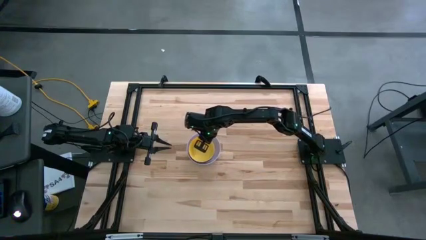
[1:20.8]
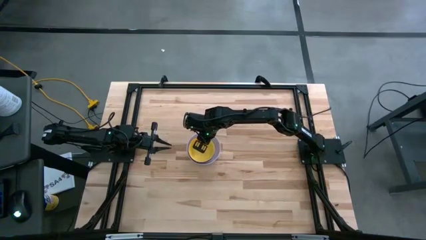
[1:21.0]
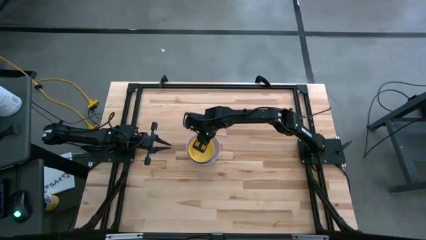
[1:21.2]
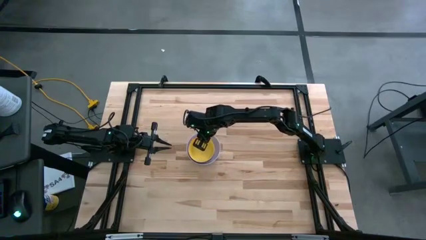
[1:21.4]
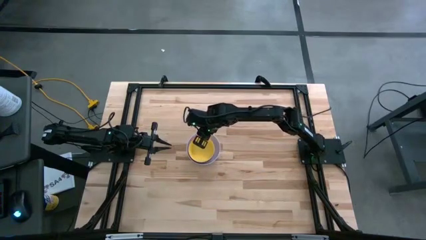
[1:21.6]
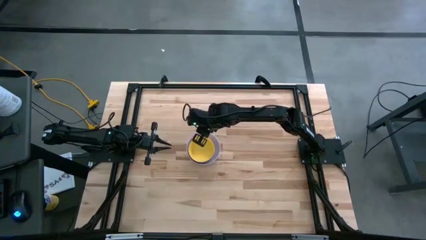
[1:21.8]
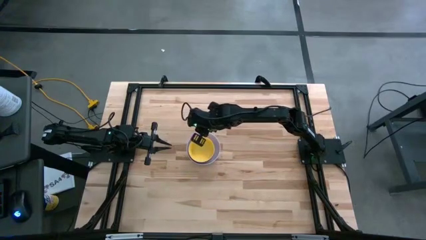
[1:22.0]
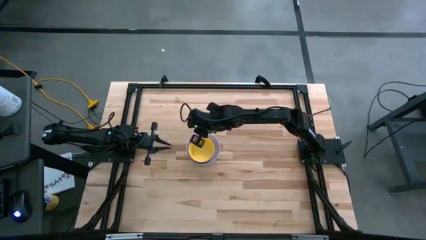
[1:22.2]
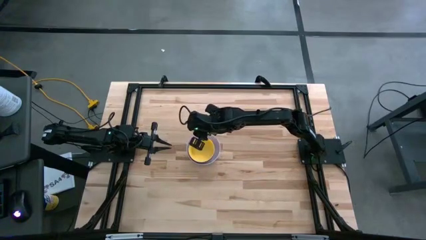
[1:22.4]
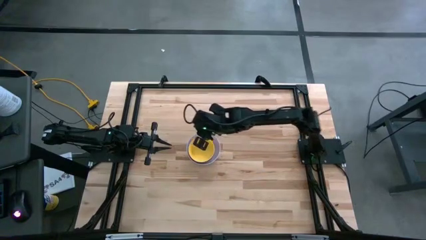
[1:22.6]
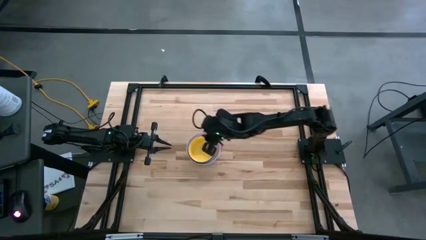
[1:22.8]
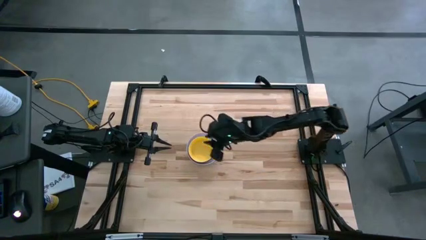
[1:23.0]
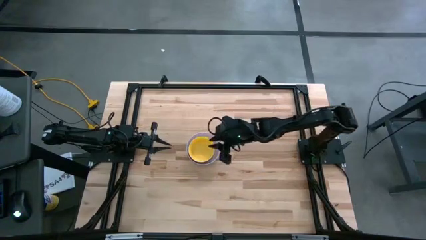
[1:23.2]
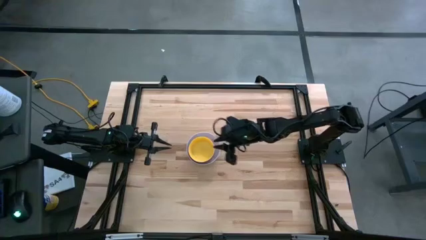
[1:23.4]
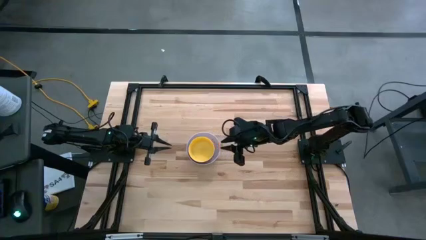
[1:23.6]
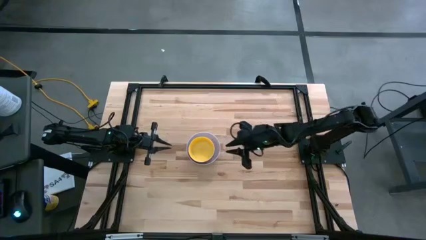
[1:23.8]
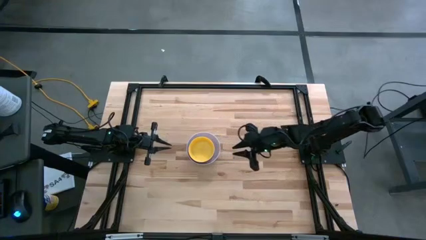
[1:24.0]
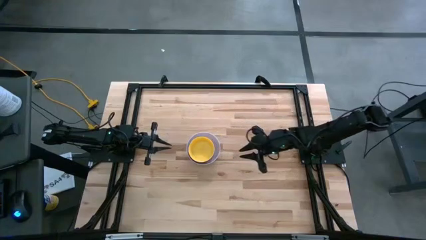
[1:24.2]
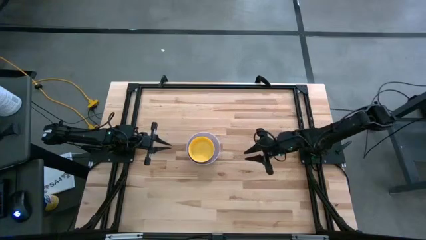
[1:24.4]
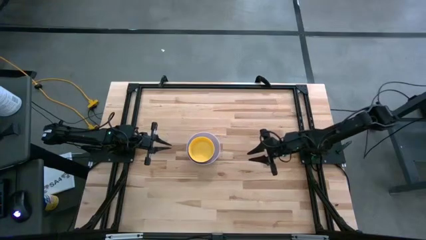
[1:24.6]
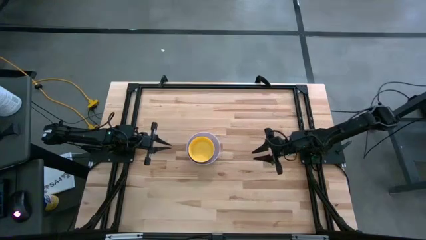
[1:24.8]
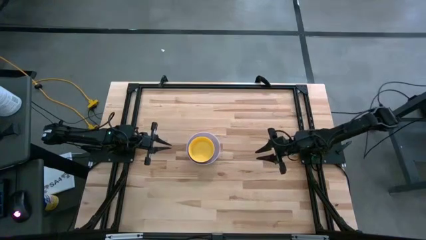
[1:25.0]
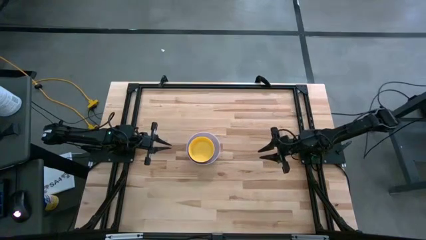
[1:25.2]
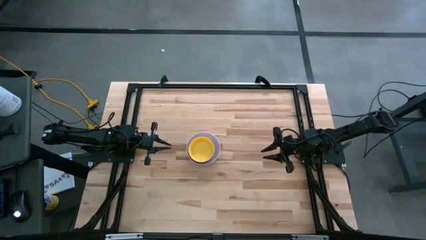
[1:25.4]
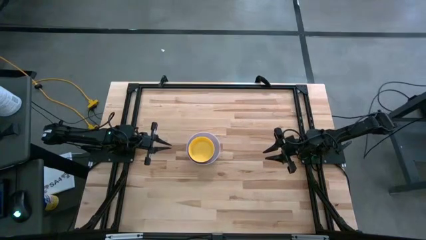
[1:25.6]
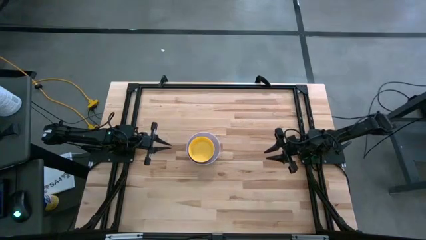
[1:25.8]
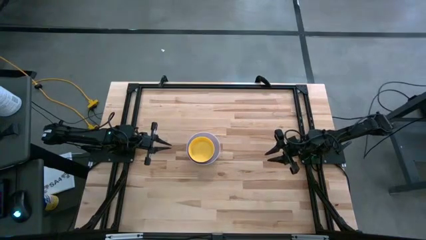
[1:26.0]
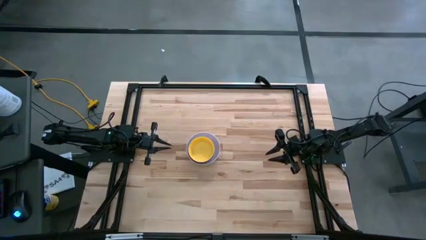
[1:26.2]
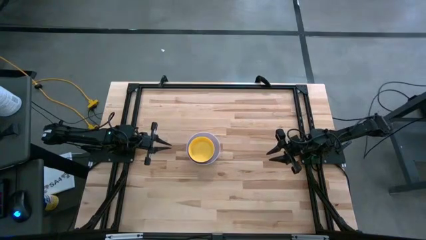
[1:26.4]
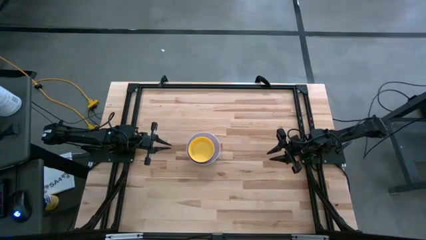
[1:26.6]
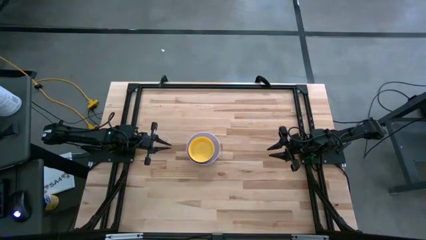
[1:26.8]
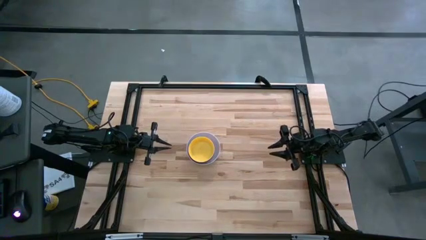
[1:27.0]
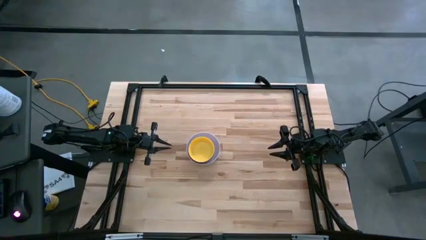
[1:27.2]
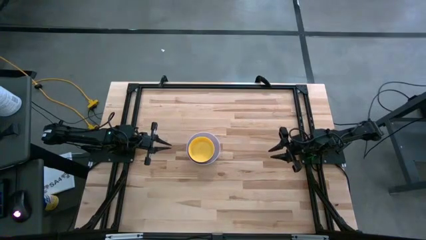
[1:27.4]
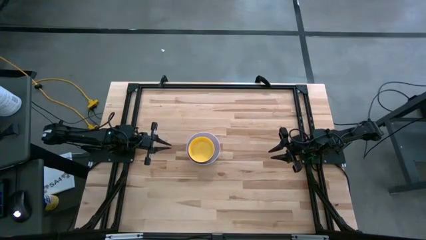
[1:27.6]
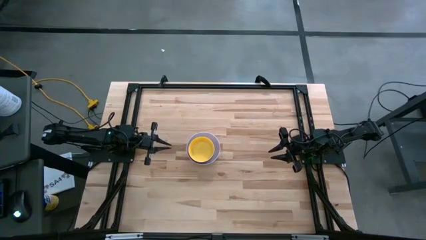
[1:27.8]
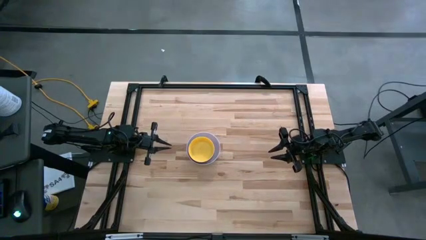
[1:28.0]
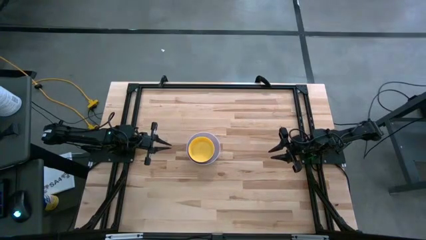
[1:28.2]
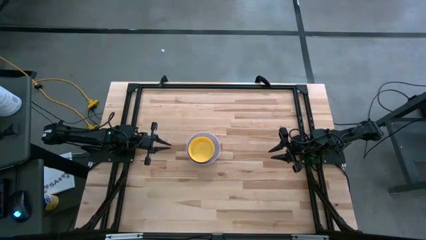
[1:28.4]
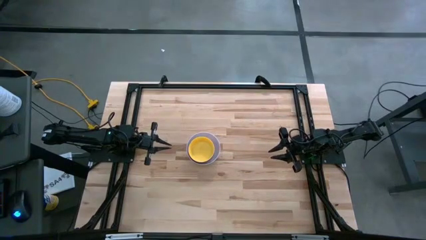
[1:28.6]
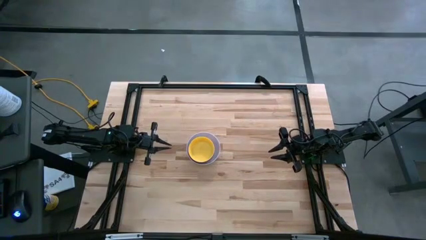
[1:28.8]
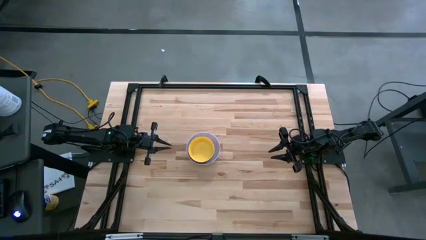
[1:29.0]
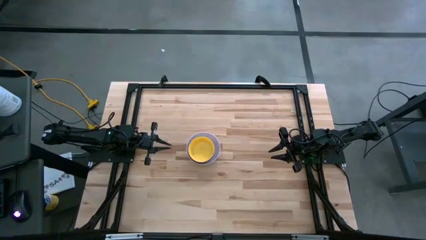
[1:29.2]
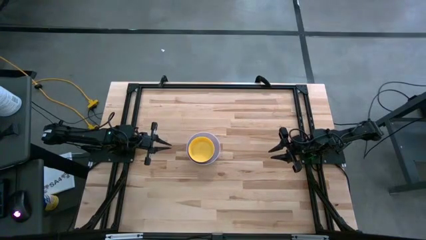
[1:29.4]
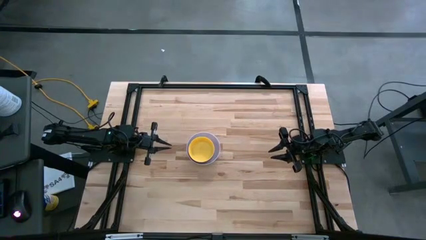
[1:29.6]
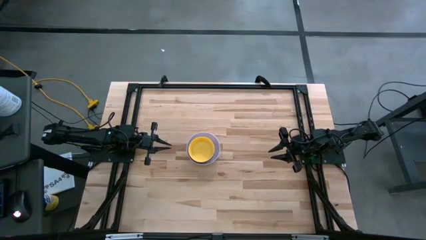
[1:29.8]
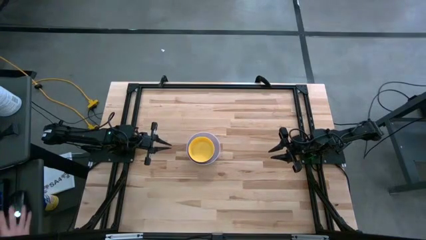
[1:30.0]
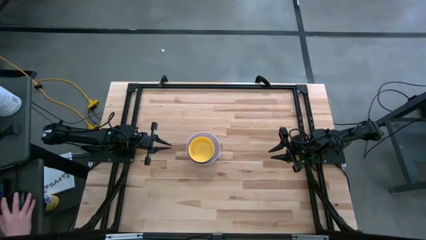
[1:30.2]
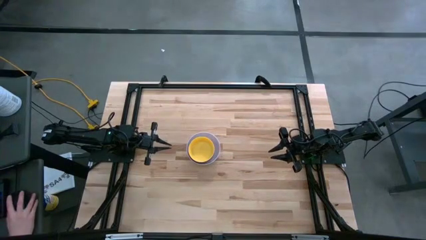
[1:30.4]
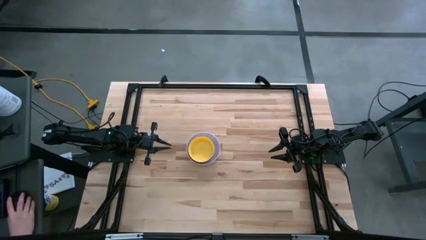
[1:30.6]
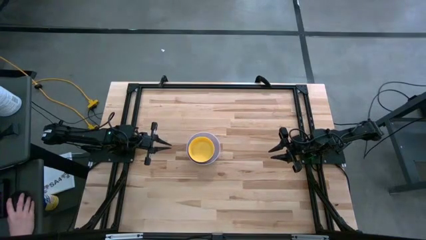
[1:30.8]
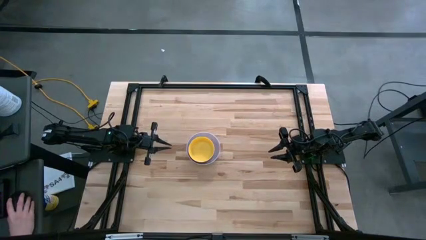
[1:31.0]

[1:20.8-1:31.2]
Return to Home Position
